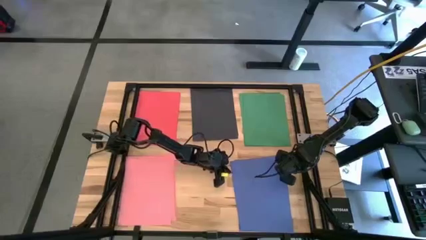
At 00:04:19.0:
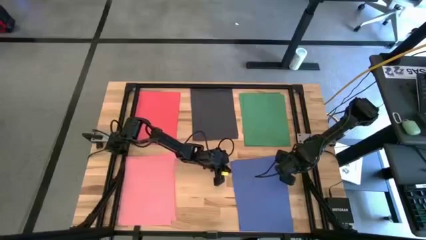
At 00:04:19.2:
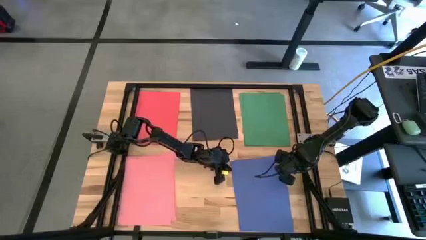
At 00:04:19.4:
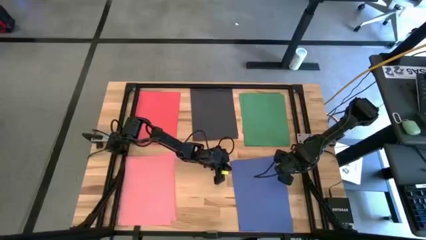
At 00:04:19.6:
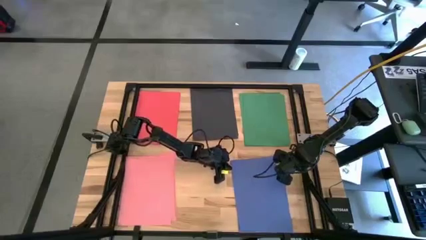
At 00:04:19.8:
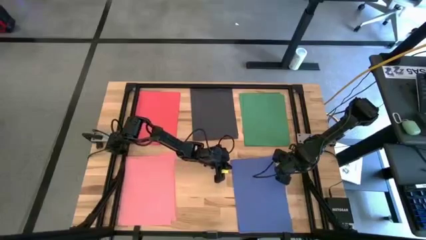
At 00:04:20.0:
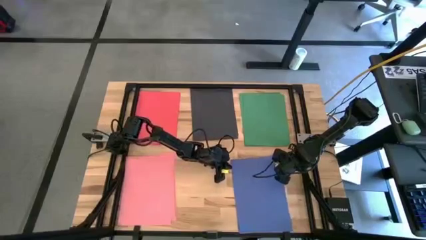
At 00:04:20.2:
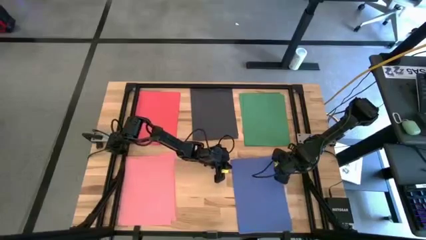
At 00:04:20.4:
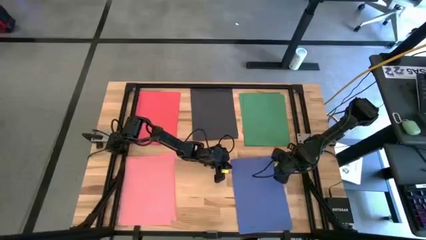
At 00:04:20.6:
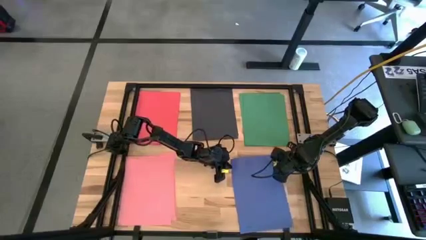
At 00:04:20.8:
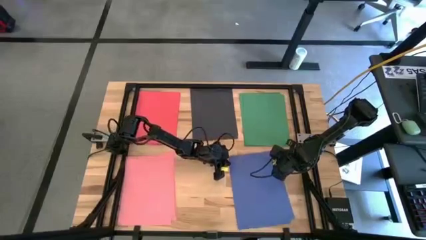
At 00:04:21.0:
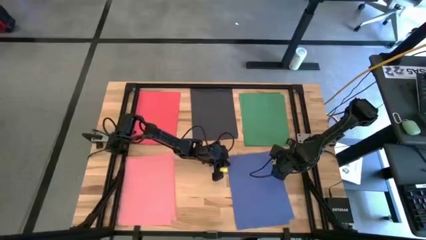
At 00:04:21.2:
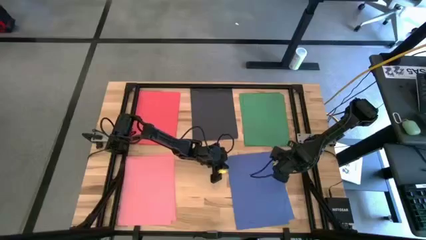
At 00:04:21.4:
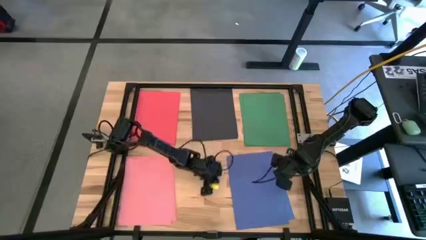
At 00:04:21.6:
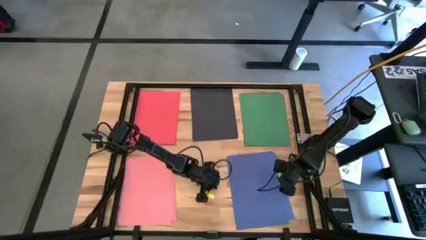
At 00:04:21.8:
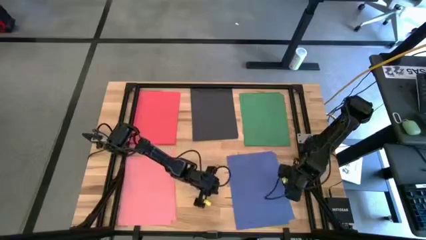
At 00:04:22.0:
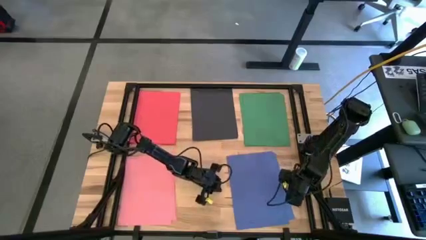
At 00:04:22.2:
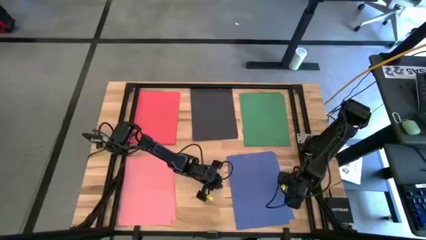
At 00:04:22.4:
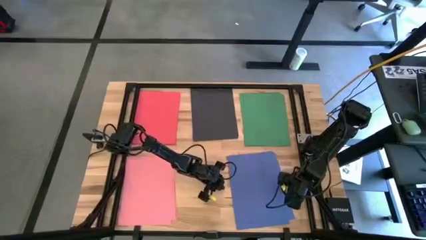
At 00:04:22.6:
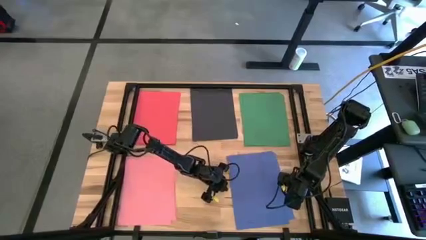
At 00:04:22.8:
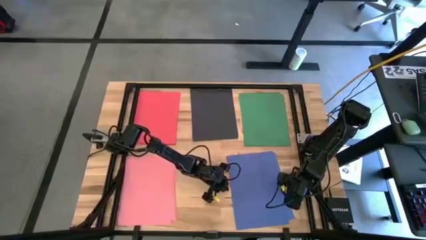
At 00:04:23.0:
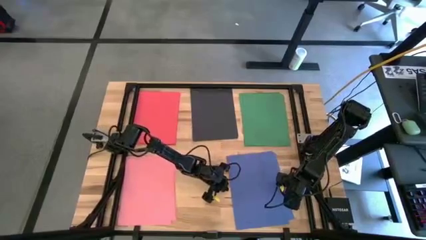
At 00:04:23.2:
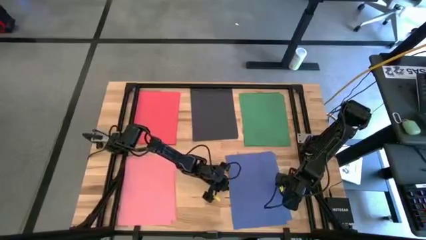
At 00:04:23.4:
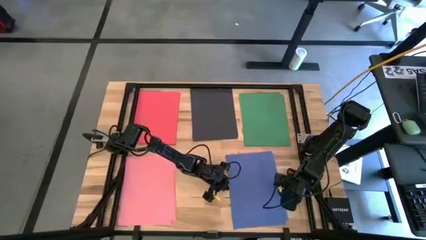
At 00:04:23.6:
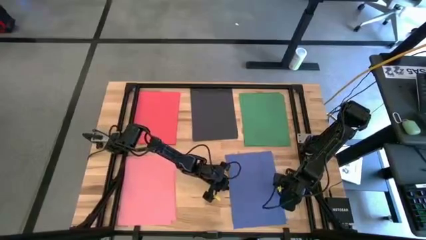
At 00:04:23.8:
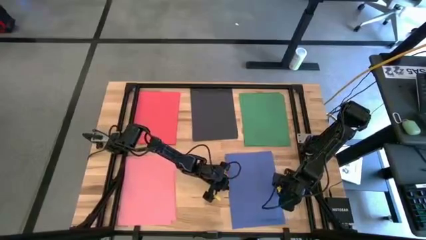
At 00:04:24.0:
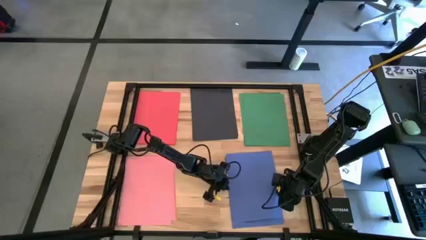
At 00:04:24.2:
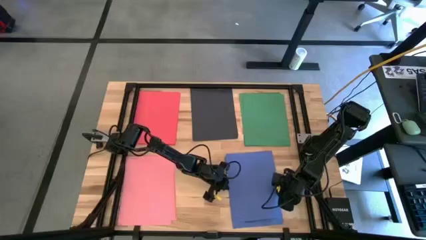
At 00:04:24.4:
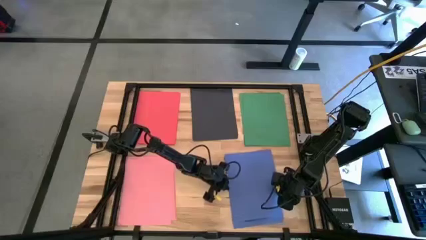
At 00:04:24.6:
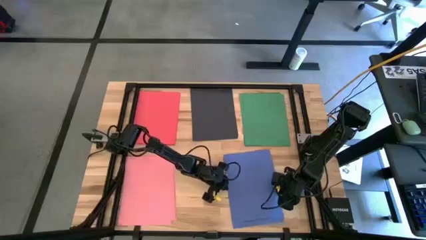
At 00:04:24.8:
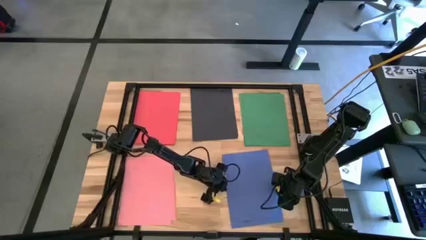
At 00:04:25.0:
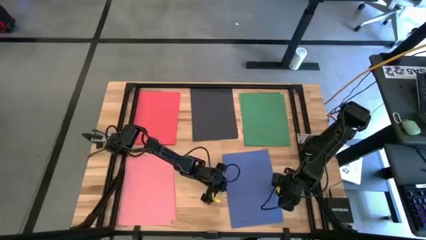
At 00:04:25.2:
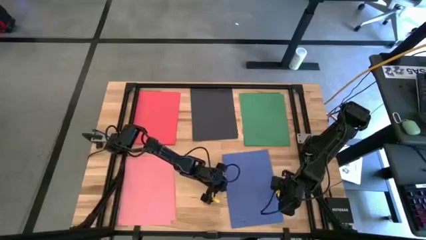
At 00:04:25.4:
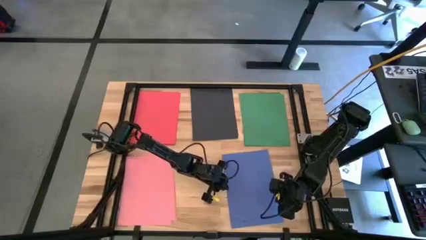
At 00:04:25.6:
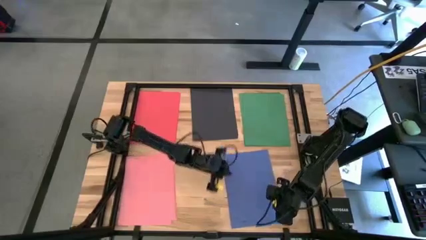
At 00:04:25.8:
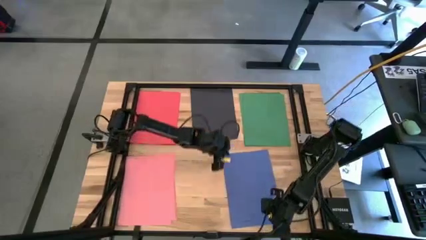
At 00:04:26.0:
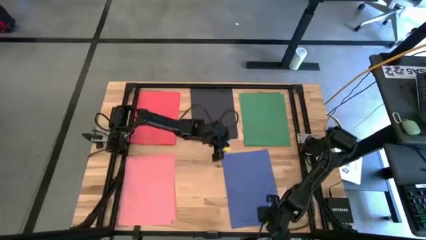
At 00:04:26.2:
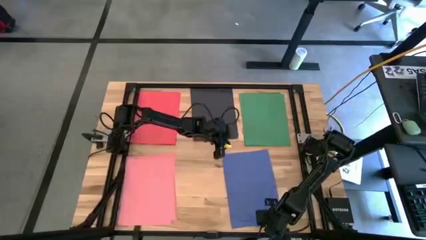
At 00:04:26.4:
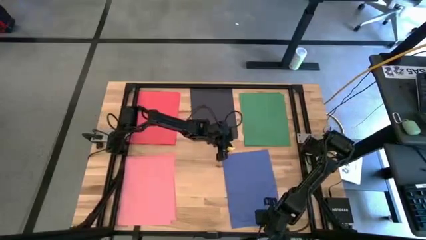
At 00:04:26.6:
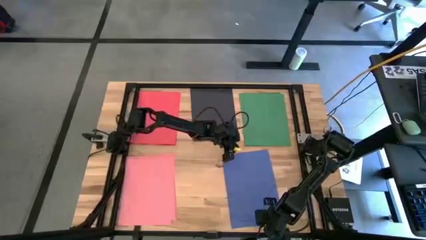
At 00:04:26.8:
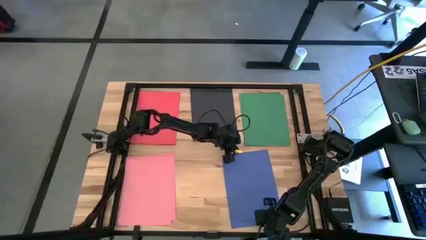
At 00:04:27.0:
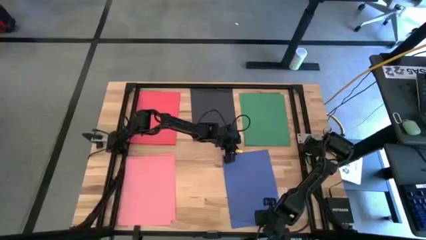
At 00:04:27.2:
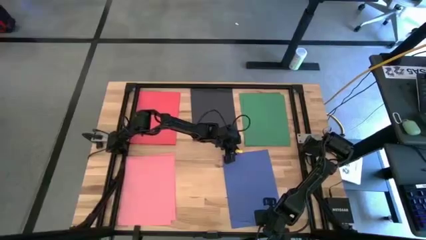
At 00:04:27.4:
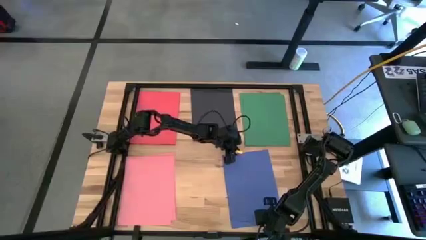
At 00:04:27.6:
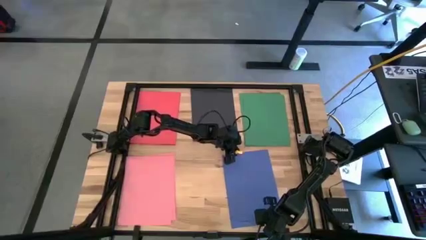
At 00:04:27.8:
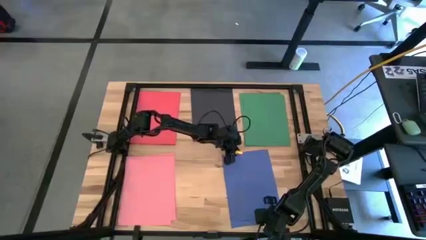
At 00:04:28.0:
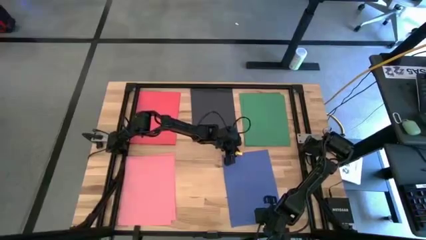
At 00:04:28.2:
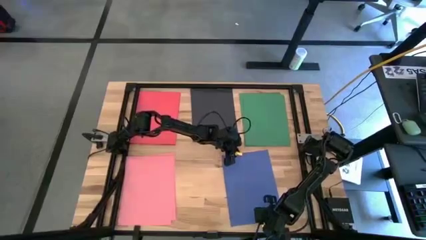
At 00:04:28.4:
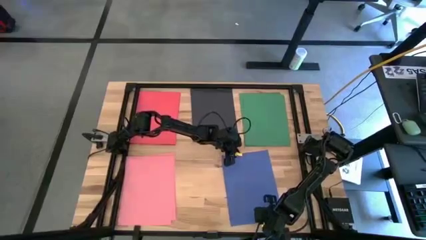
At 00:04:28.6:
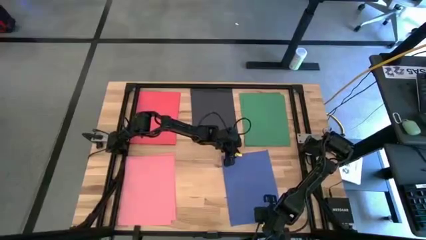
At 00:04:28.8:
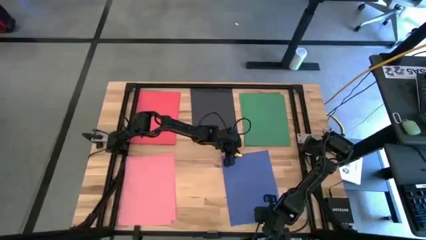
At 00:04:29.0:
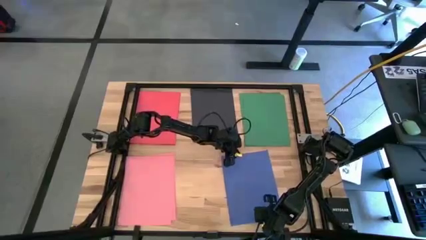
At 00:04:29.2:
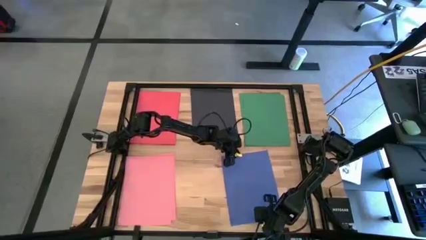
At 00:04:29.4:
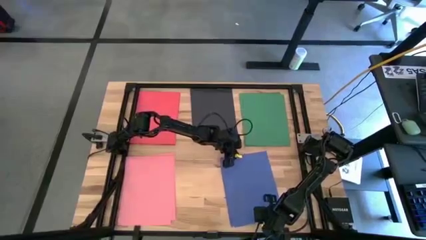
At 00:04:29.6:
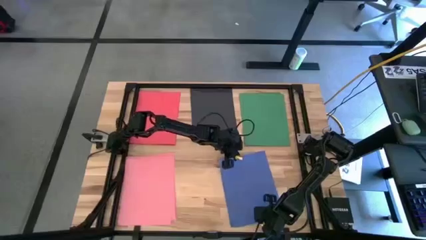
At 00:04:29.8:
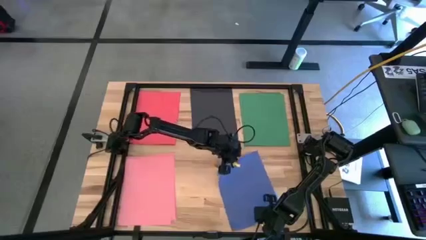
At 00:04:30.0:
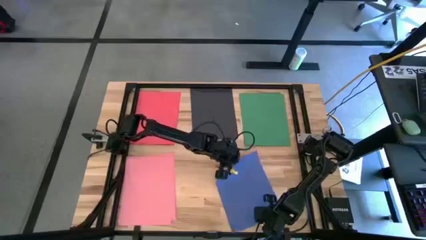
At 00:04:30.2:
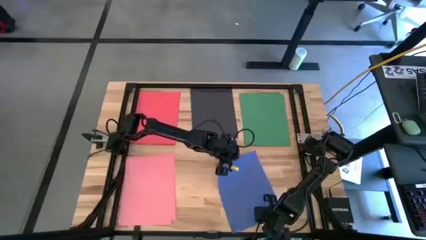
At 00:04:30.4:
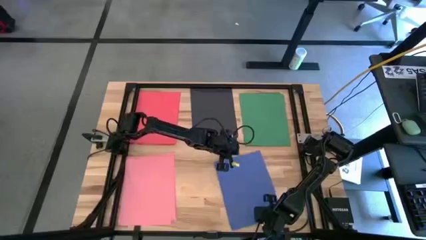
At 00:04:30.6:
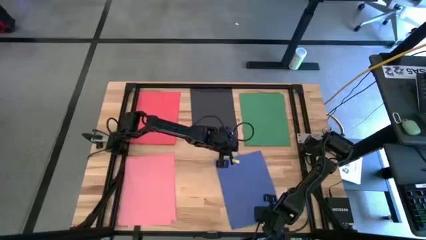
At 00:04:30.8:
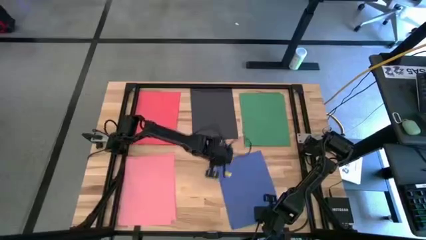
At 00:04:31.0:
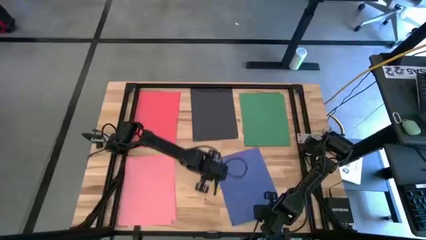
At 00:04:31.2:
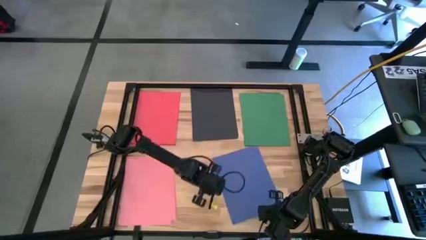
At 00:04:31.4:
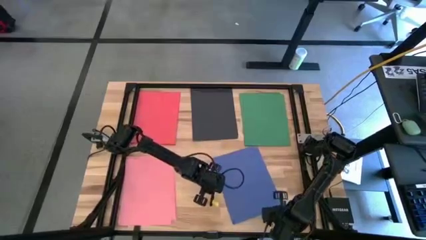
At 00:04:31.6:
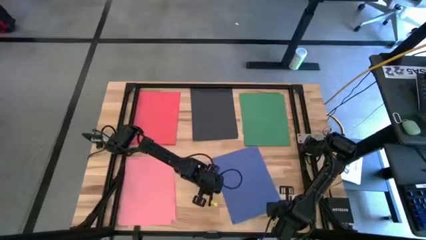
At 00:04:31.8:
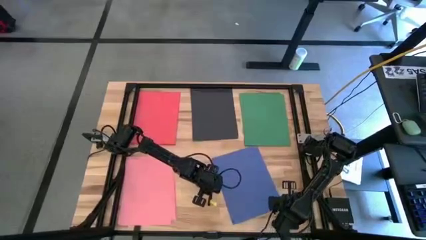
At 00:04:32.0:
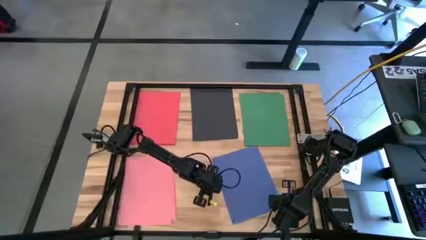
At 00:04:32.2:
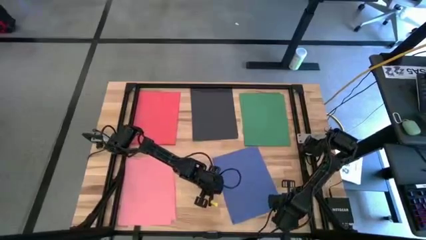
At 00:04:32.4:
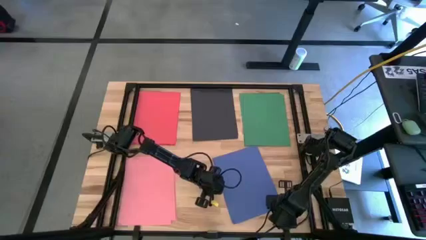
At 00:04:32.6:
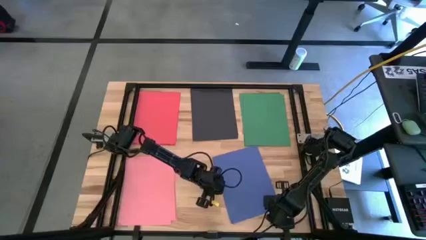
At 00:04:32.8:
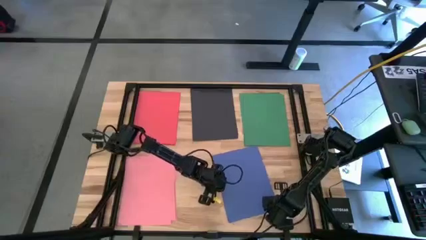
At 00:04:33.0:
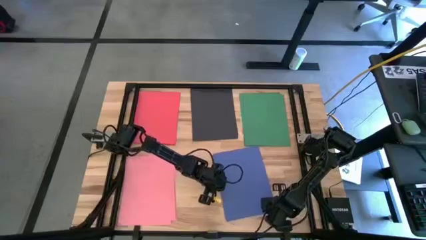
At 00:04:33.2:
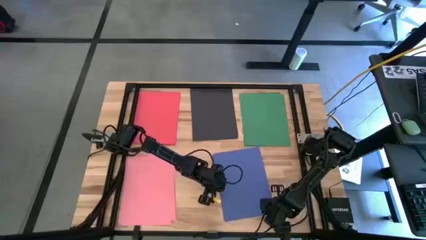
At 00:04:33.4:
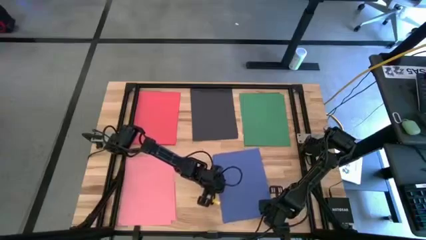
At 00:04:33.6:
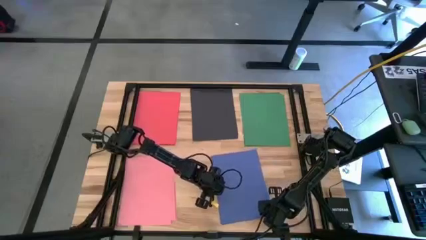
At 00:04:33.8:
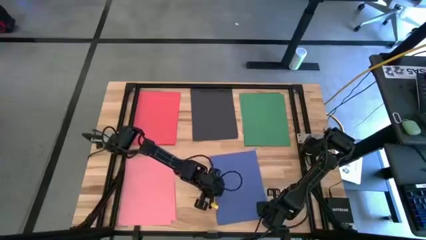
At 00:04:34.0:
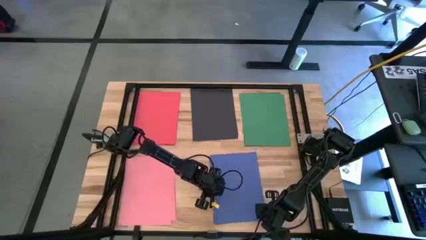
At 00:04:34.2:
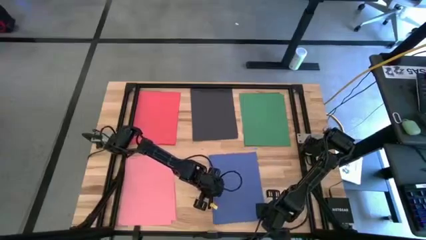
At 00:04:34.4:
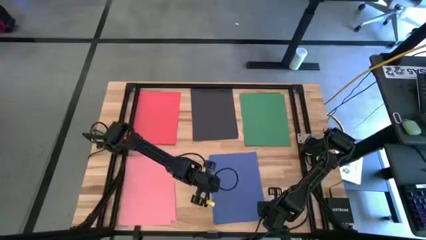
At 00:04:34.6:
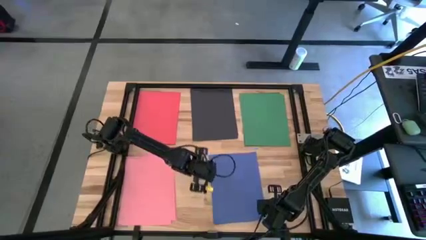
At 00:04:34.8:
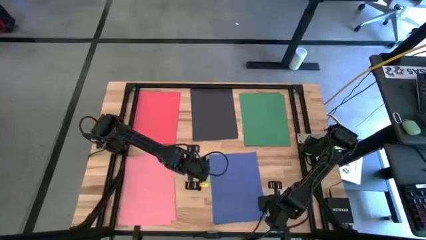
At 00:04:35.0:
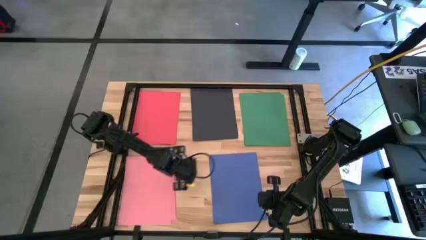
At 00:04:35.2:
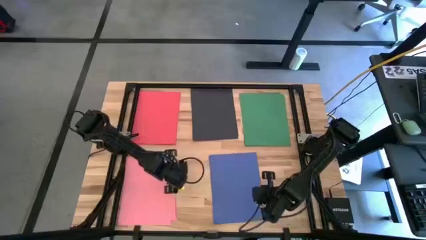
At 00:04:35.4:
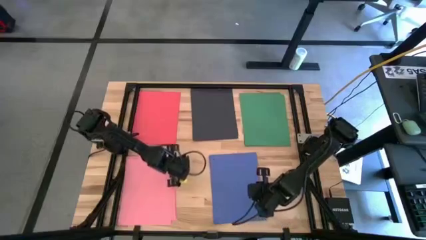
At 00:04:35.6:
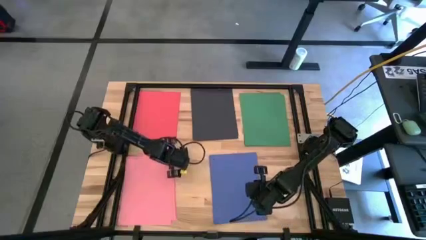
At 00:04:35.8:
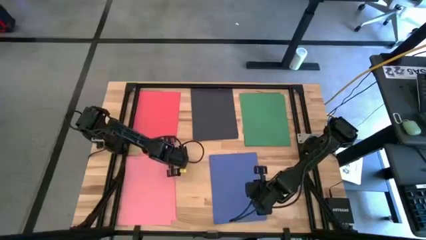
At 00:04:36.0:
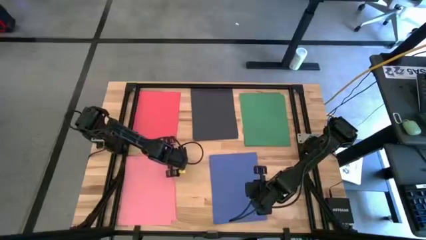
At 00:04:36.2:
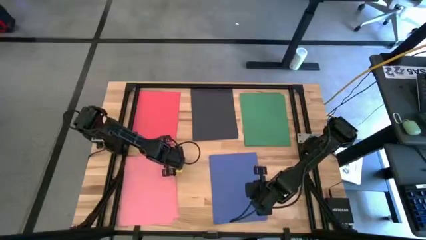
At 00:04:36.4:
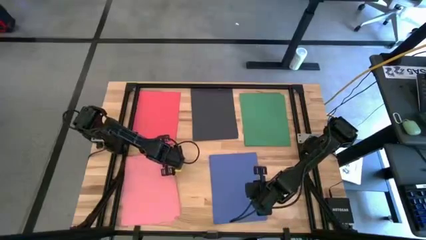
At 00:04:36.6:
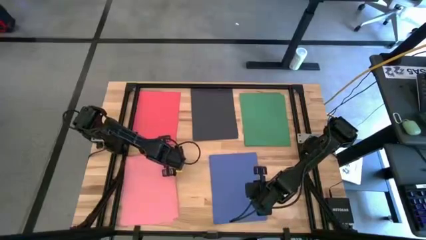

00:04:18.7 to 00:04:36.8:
Task: Organize paper
Stack the left blue paper on the stacked blue paper
